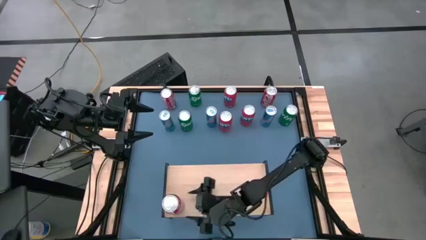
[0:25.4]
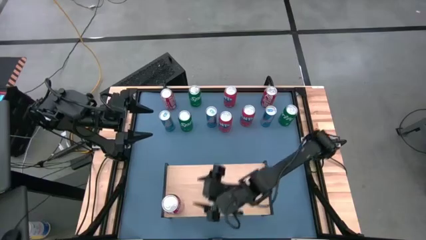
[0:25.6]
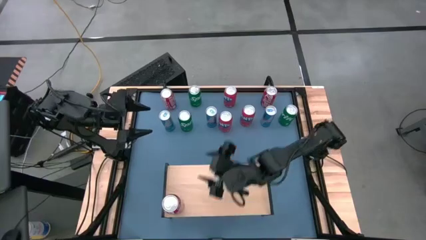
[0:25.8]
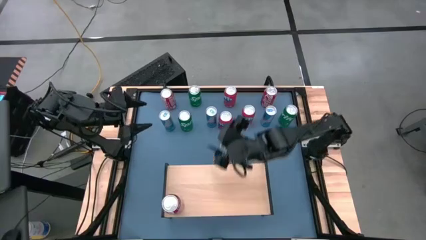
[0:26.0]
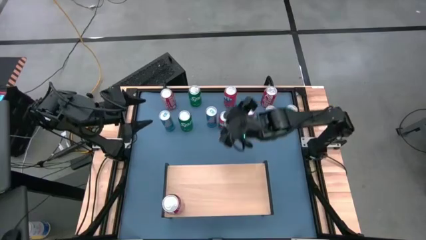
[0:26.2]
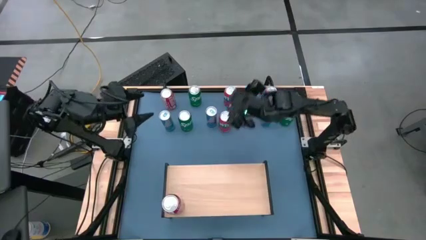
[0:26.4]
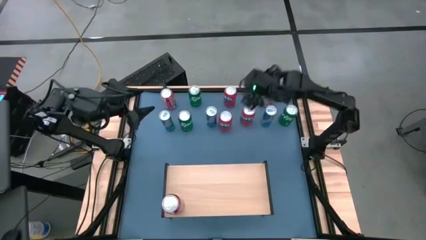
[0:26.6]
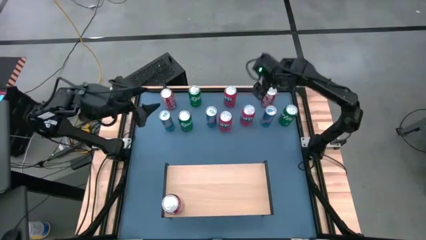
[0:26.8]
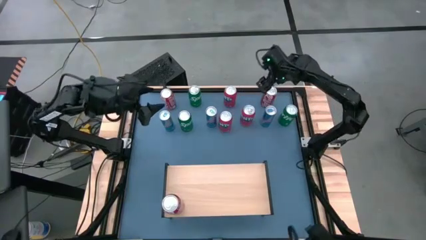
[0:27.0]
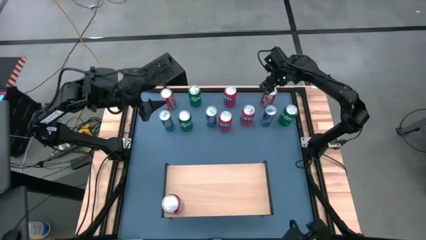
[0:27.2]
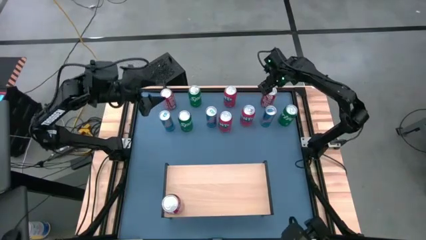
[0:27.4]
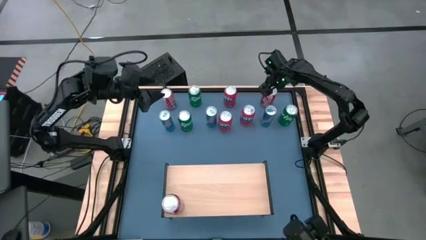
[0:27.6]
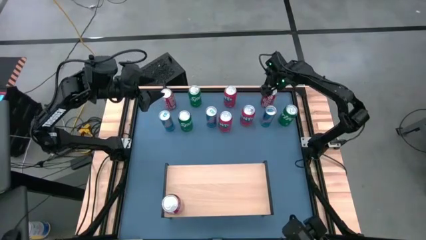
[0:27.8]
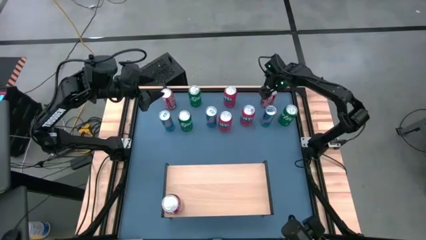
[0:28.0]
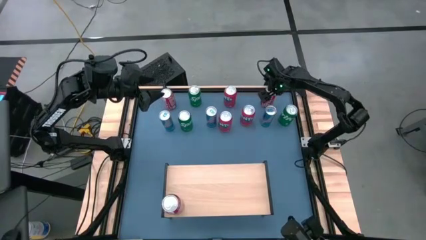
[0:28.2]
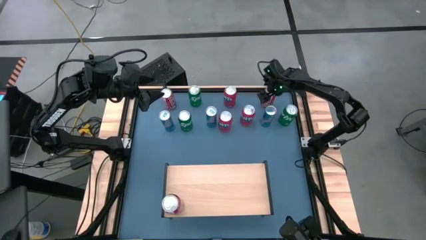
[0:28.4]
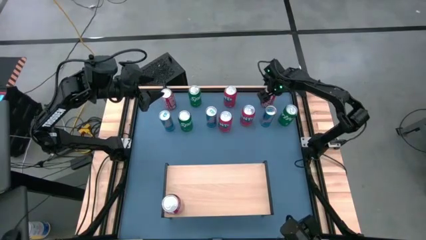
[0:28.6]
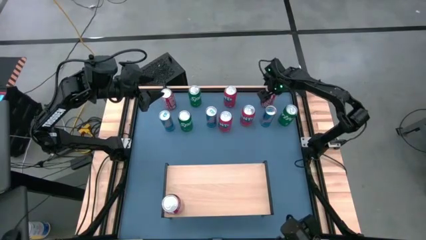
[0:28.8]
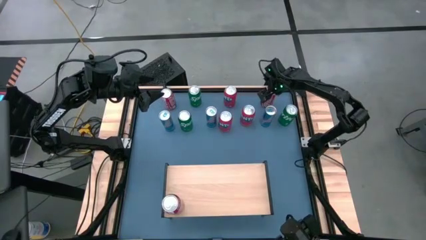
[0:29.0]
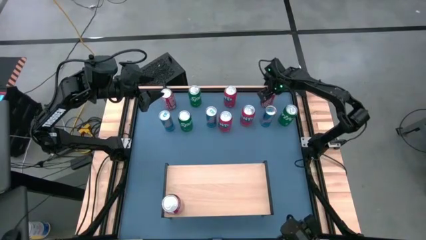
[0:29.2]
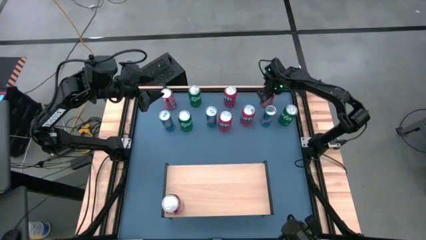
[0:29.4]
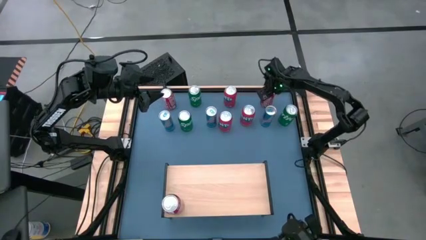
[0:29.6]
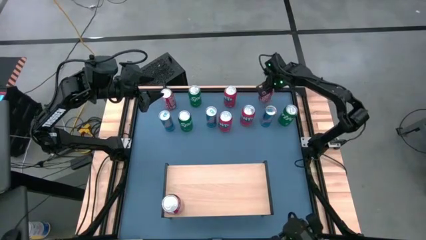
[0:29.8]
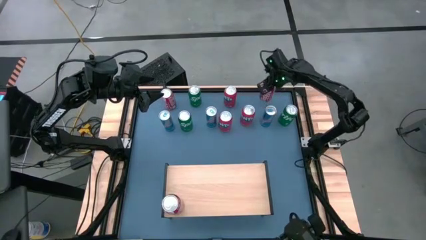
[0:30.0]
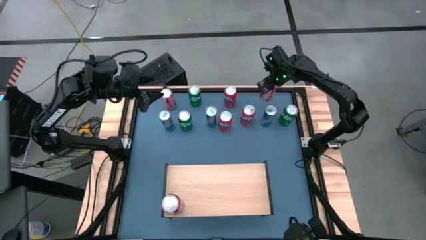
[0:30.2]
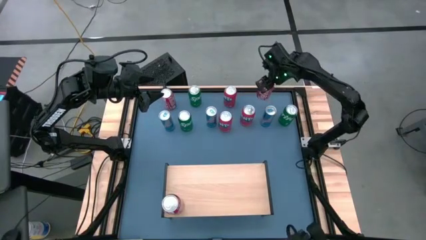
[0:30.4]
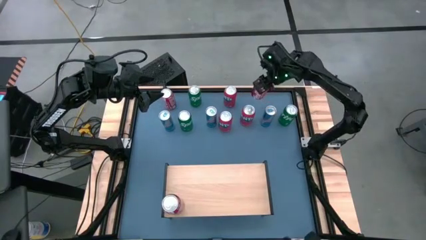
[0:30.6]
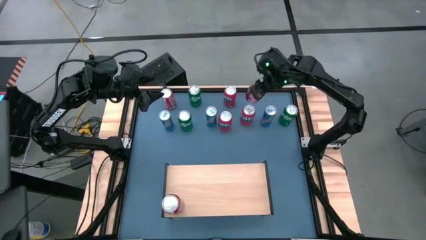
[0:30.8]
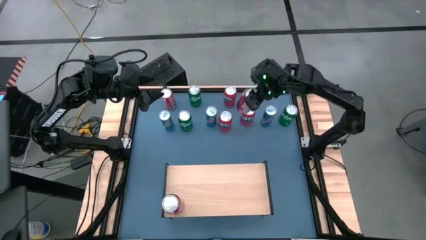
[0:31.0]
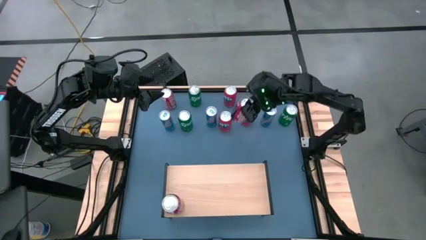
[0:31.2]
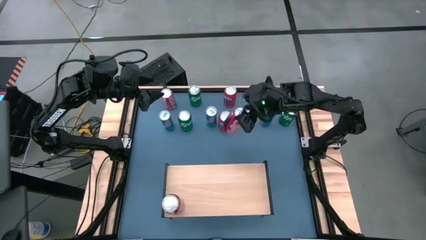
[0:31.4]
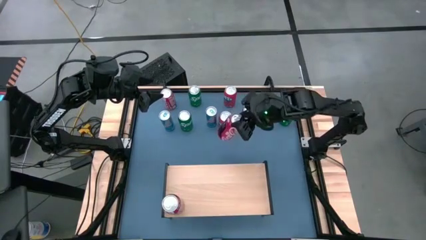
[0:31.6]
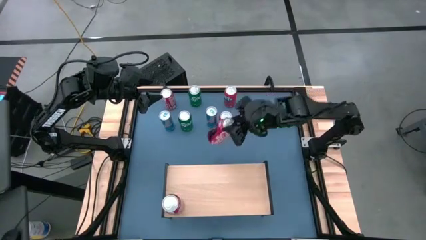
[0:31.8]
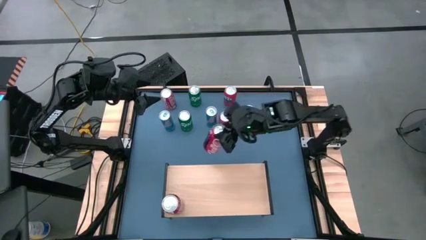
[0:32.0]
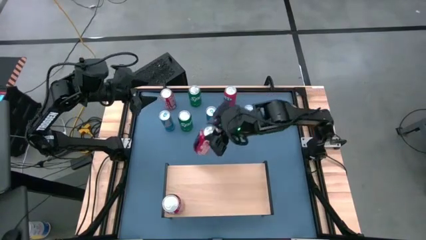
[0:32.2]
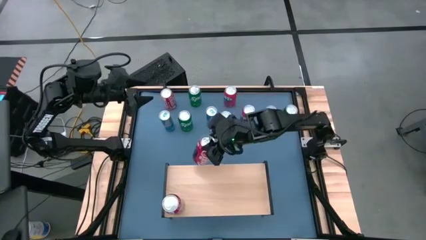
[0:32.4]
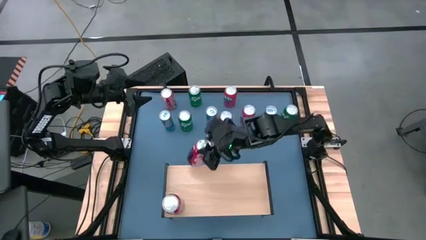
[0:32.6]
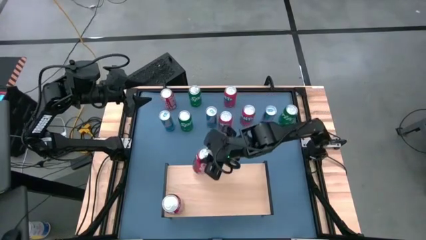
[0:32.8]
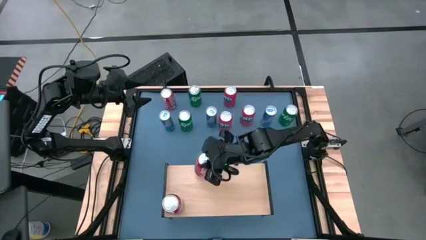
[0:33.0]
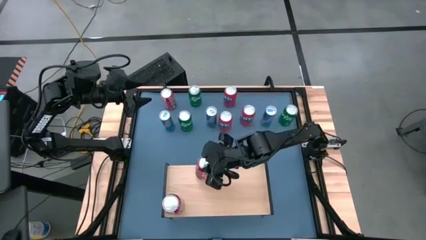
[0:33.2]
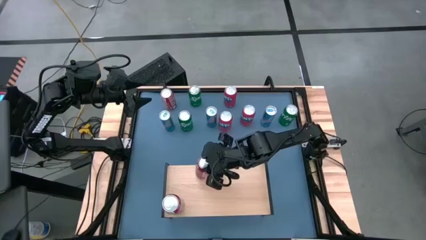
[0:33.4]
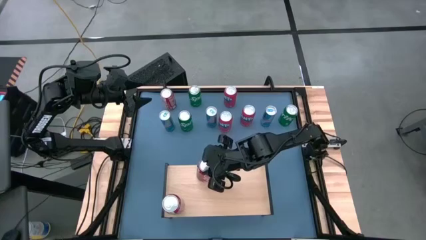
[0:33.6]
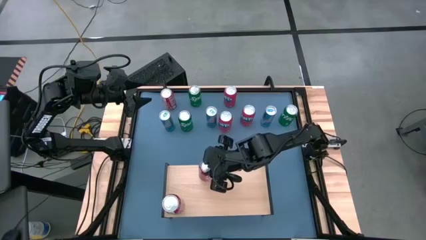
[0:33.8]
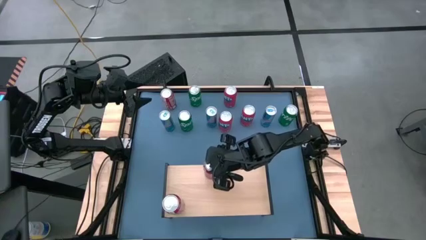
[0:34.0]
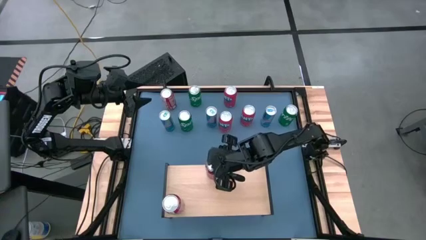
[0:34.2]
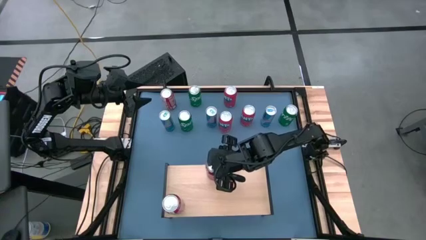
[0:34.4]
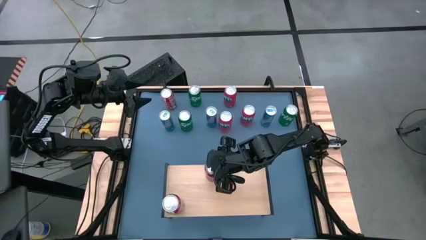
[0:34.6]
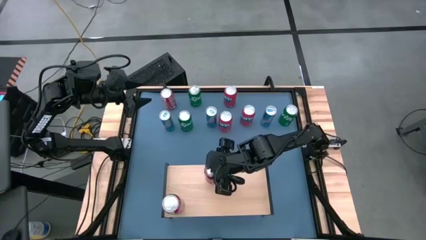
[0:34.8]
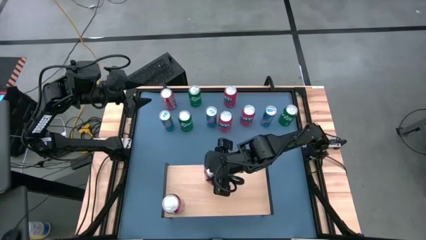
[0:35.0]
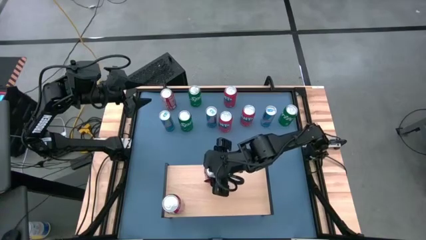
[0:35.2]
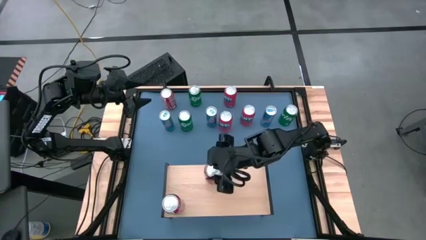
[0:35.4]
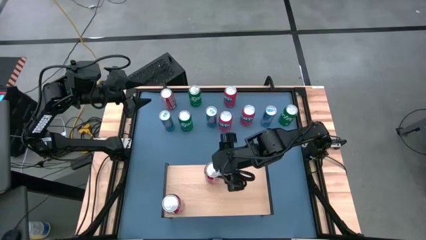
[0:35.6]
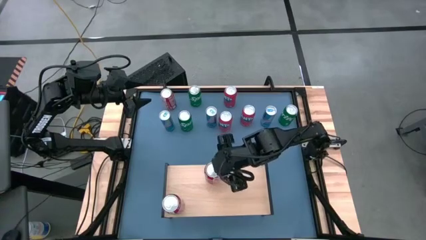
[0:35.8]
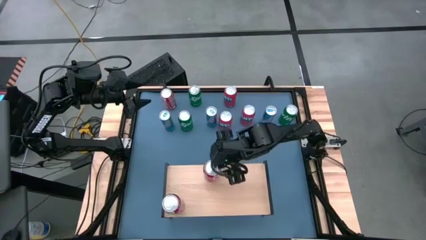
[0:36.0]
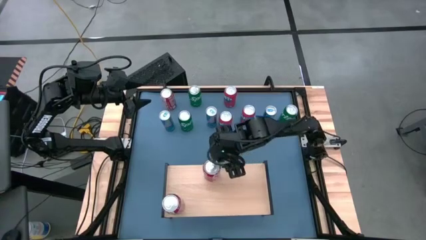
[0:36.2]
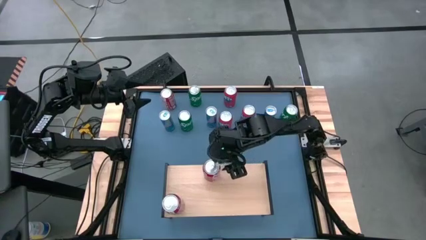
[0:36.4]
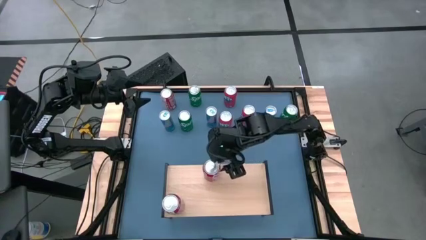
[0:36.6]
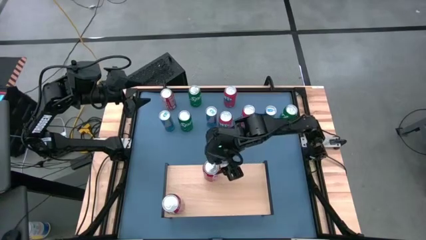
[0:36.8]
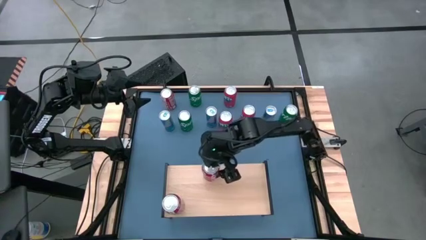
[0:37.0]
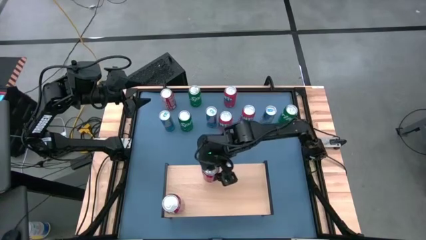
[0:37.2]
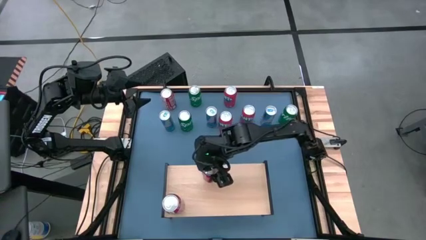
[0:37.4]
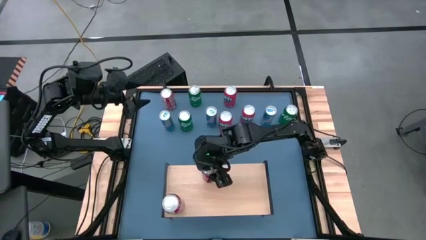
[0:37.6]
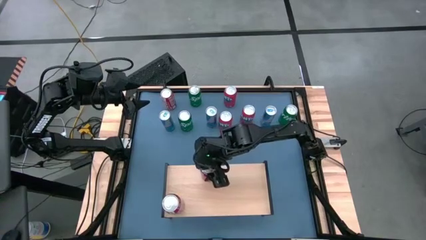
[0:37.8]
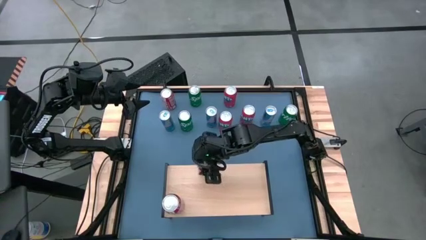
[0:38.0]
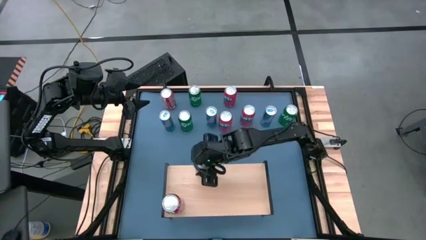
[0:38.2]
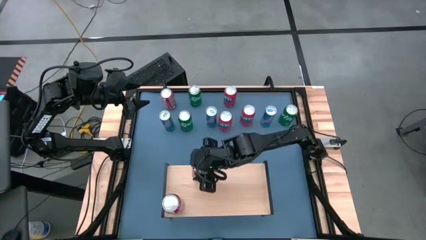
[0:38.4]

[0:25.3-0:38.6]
Task: Place canned beverage on shelf
Put the right red soda can on the shelf aligned with the other red soda can
